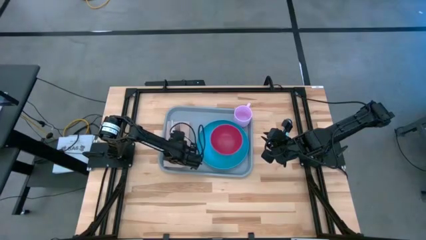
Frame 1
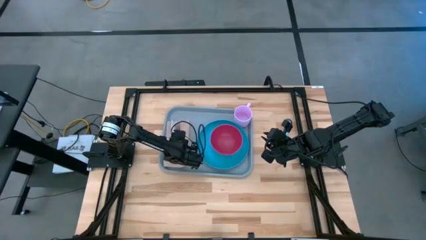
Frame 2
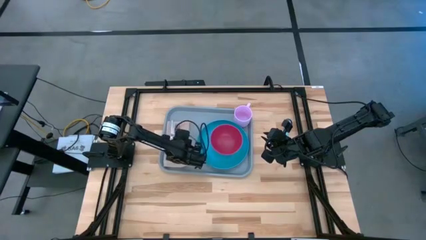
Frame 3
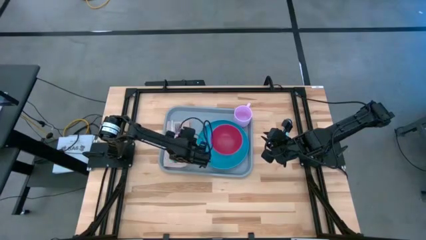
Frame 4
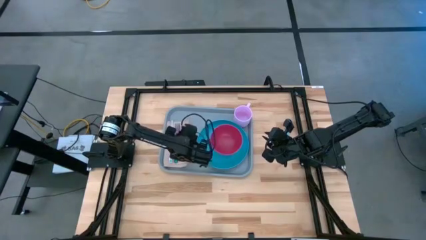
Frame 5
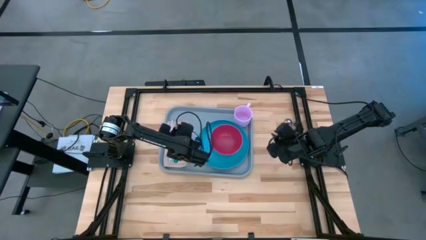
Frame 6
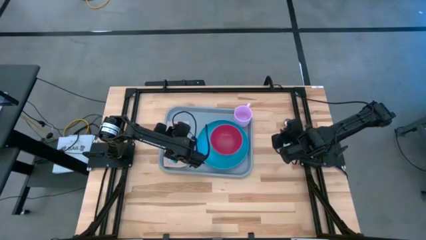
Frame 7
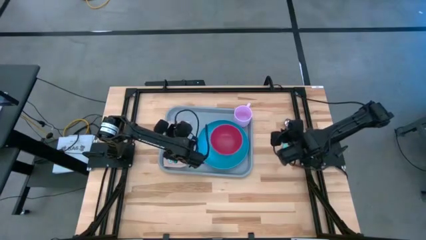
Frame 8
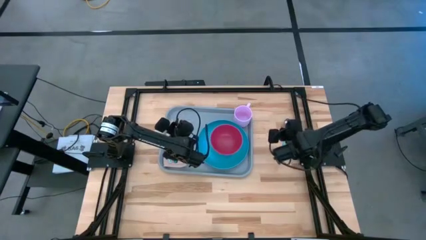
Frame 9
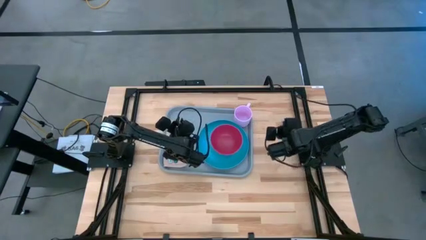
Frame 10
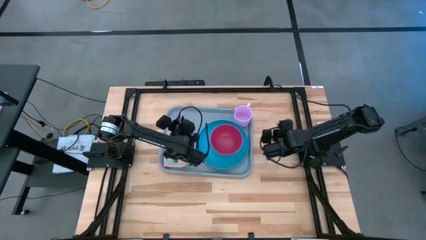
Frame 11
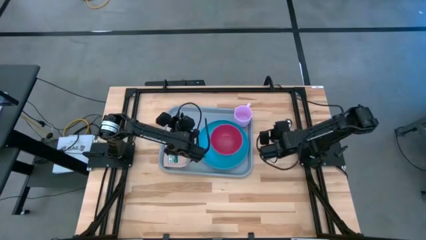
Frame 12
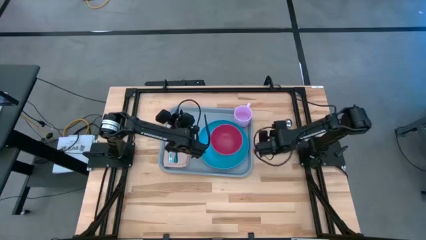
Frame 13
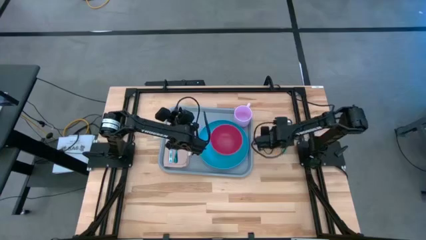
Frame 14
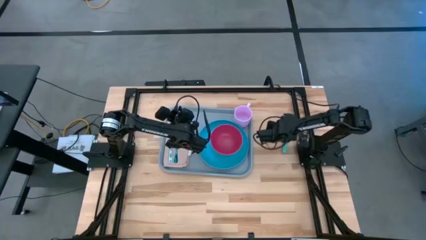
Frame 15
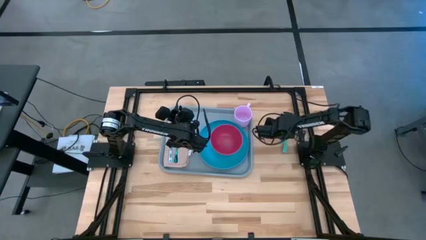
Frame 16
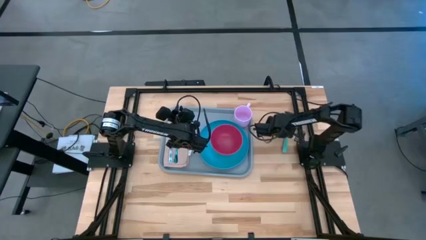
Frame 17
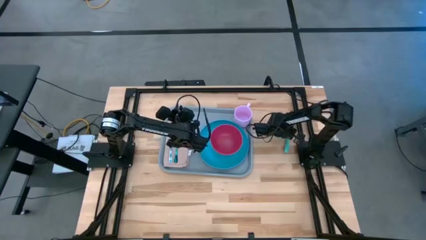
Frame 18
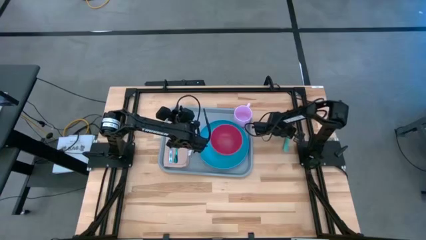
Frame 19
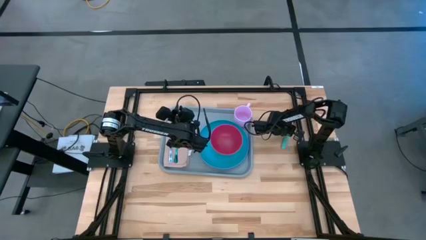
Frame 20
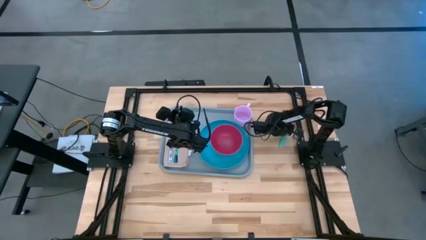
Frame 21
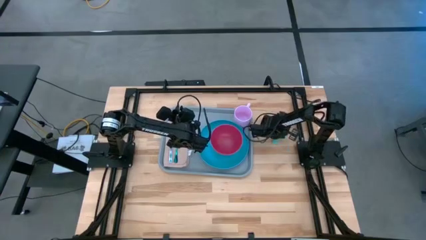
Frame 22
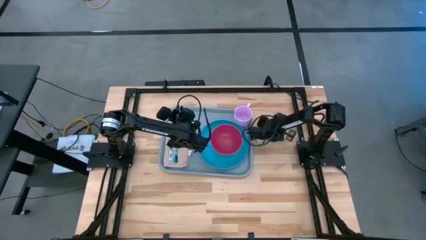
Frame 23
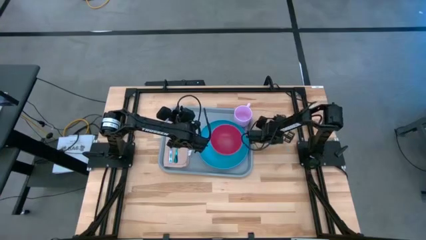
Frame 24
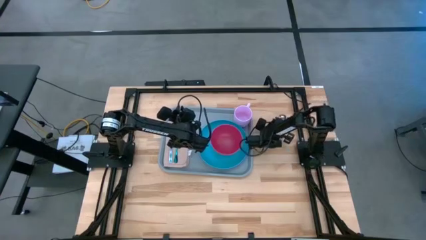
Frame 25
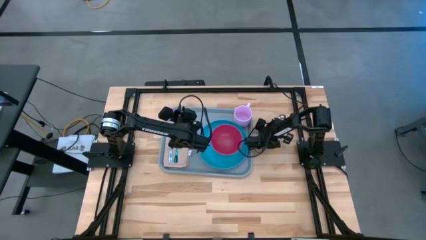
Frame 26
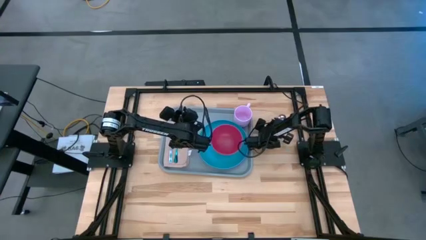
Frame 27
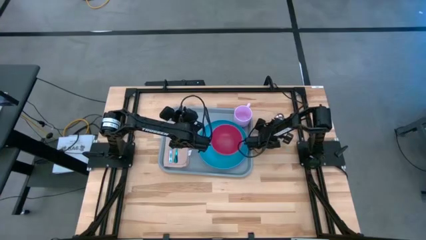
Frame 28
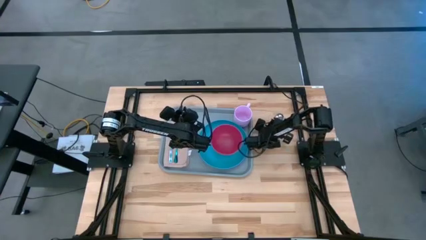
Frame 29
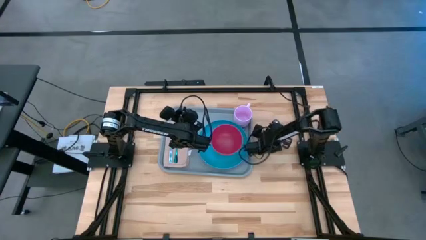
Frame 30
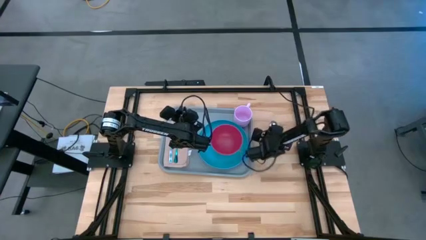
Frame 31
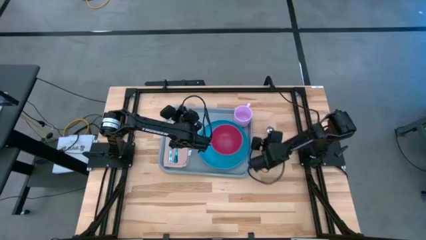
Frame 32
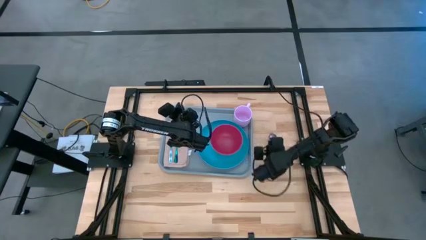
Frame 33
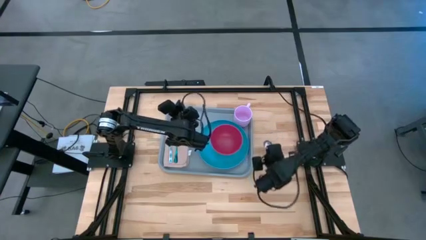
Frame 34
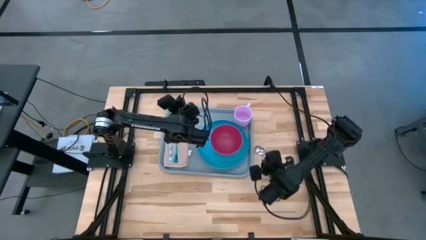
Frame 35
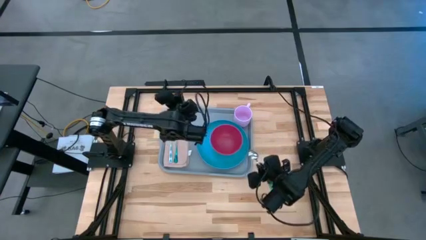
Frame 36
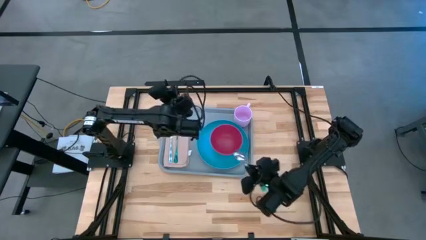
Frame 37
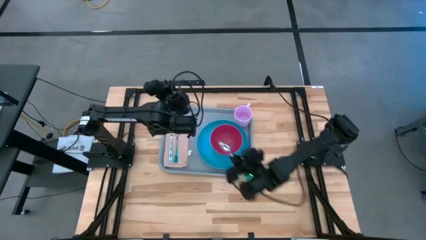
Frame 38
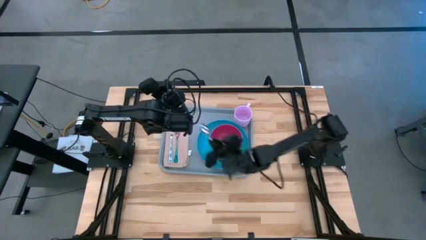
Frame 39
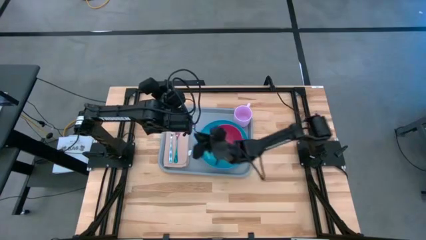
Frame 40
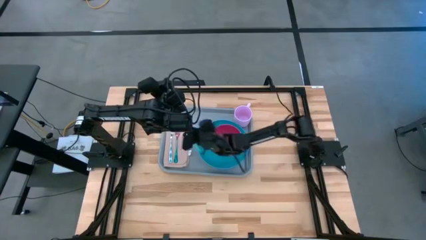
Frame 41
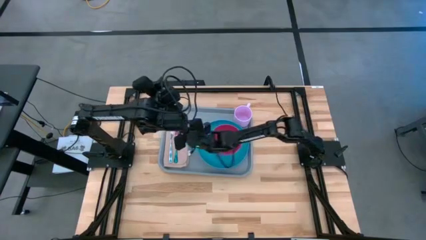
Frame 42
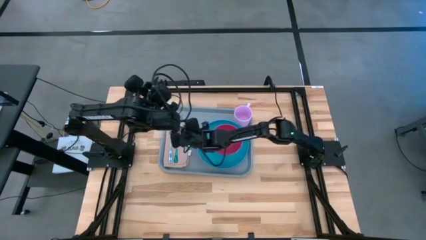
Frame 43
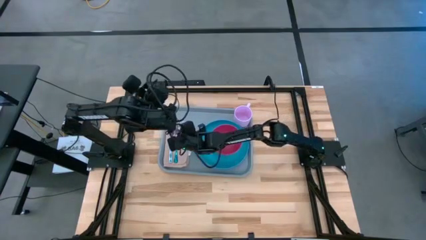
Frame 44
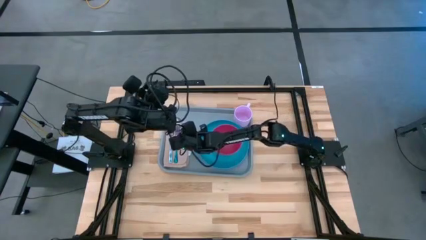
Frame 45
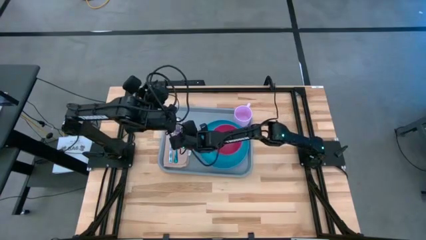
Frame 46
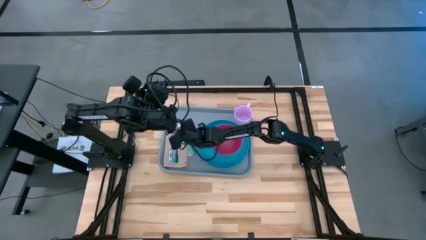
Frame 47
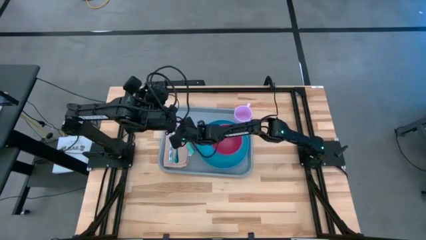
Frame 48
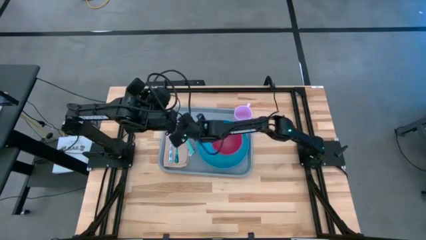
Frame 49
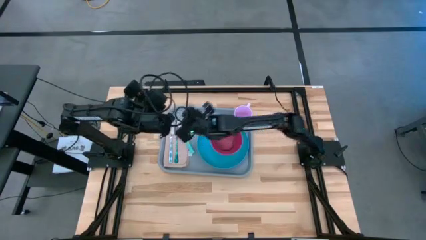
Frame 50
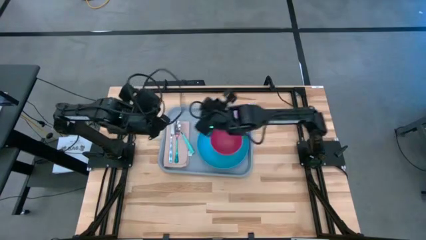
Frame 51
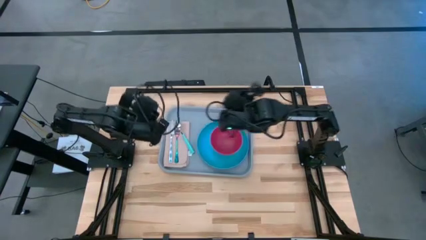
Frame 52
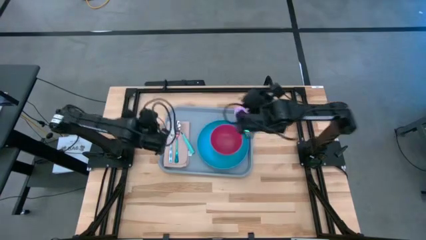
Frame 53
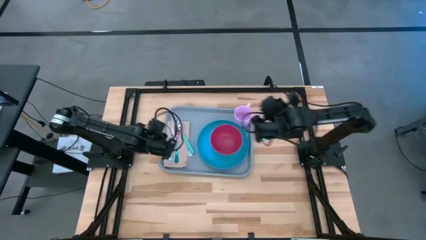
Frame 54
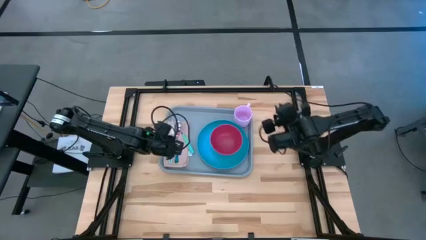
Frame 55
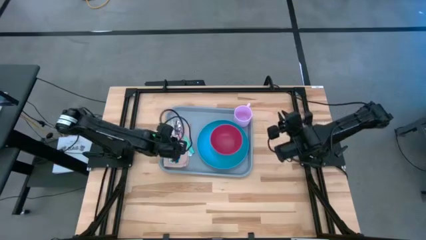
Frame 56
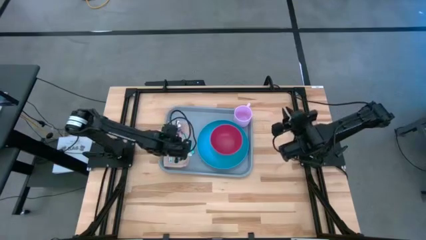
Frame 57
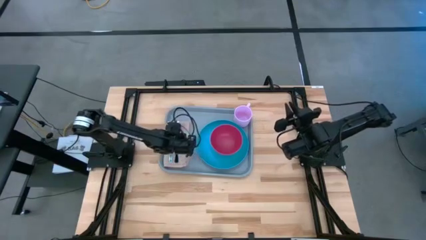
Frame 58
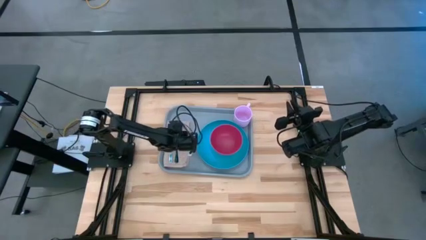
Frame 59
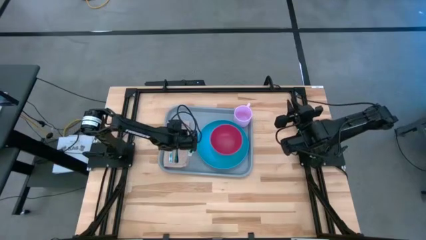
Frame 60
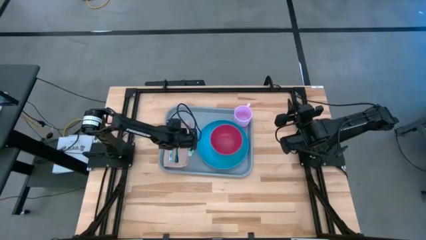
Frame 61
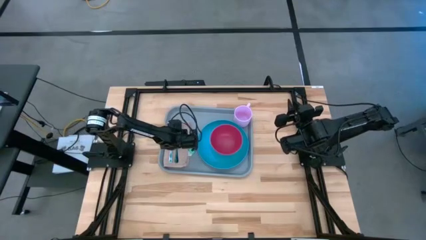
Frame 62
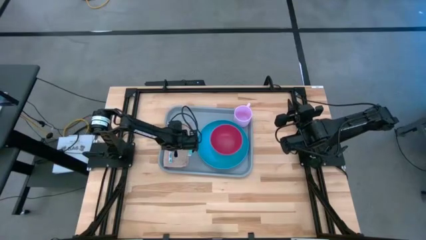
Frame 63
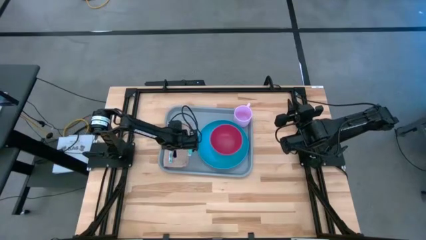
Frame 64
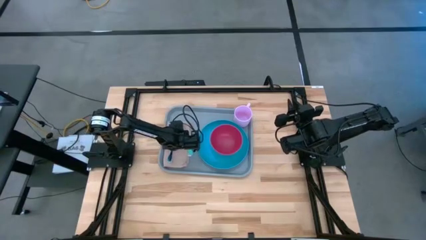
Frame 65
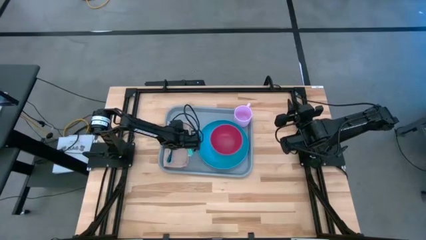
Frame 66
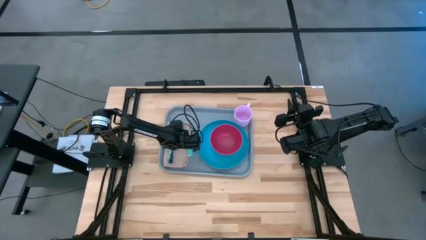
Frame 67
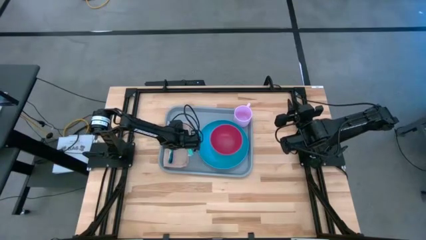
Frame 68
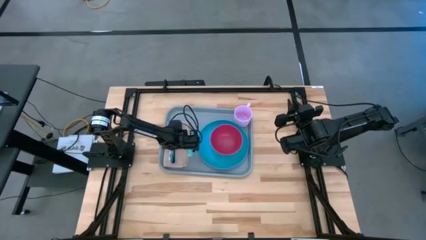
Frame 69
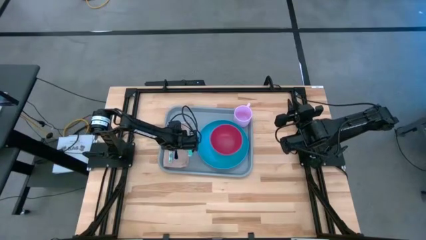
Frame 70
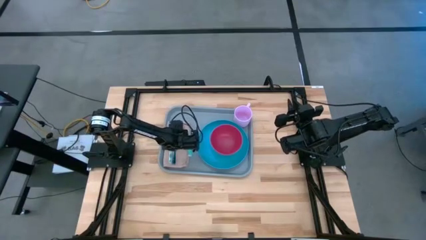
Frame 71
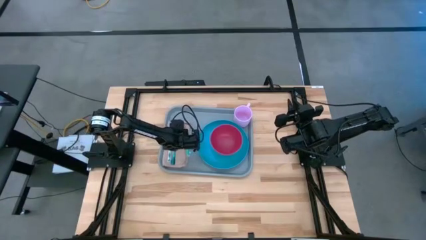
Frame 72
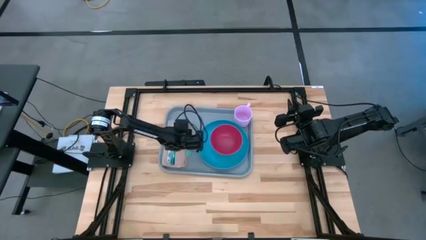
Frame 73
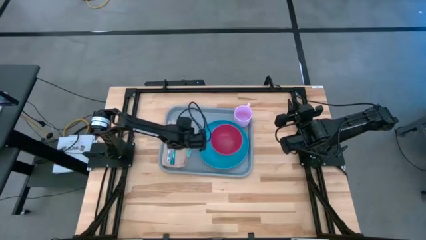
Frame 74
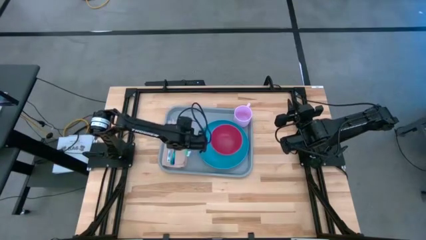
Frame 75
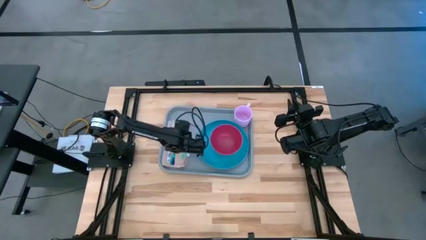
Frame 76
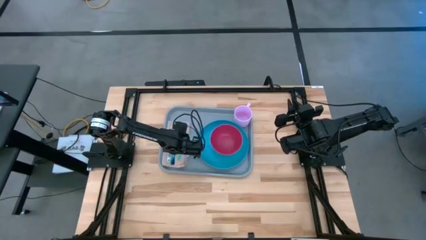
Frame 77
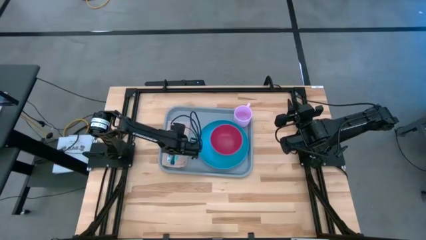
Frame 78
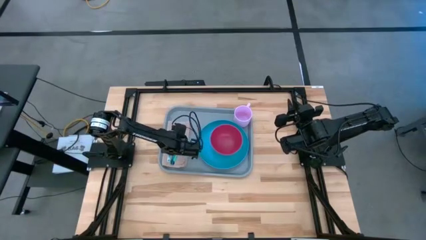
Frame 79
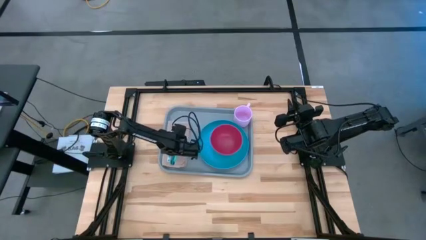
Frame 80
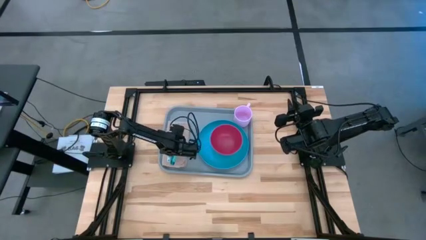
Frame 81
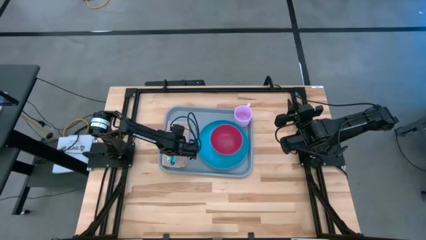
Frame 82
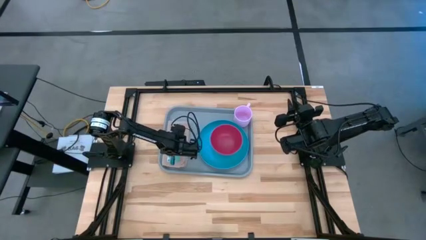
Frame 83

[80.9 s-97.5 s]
Task: Set up tray
Put the blue spoon on the brown napkin to the right of the fork

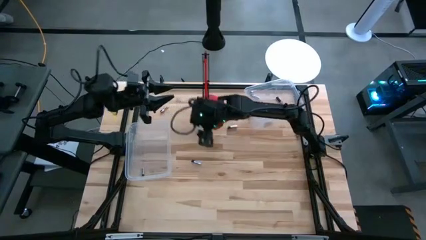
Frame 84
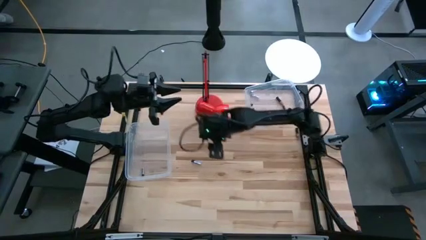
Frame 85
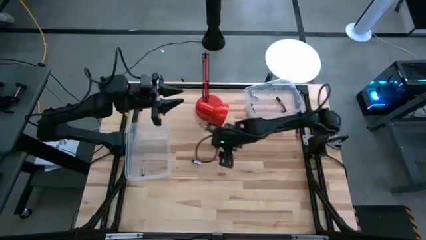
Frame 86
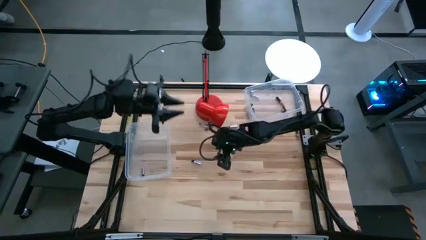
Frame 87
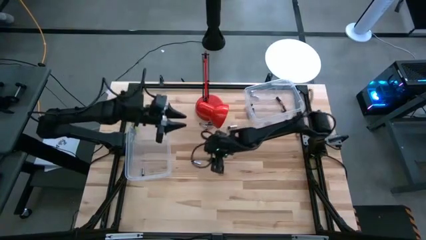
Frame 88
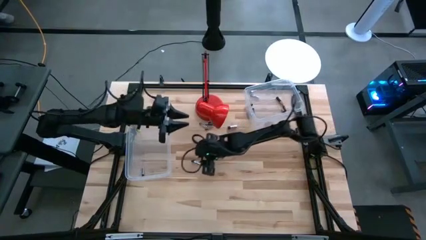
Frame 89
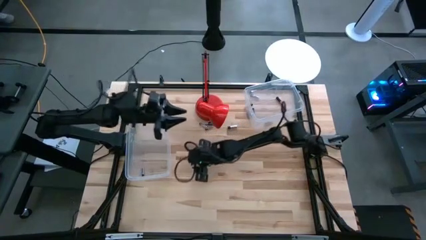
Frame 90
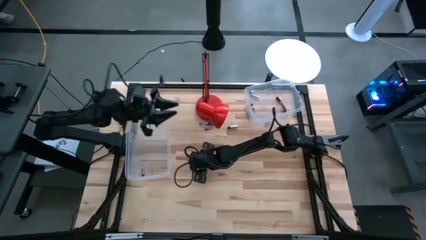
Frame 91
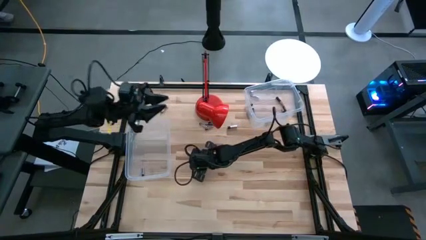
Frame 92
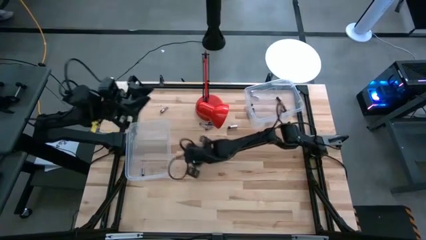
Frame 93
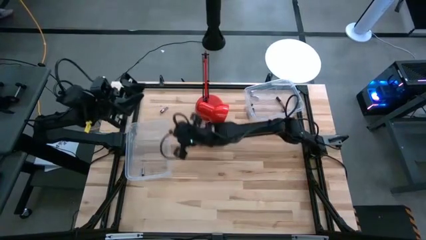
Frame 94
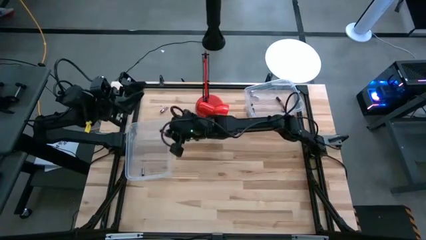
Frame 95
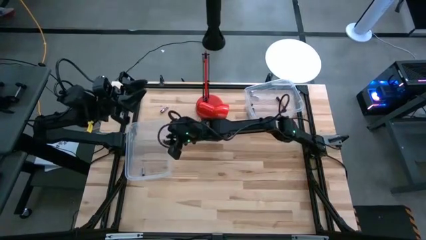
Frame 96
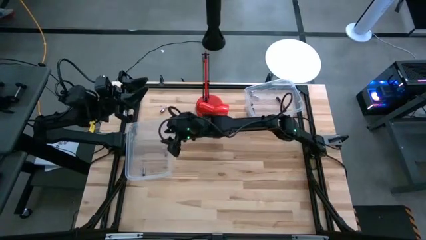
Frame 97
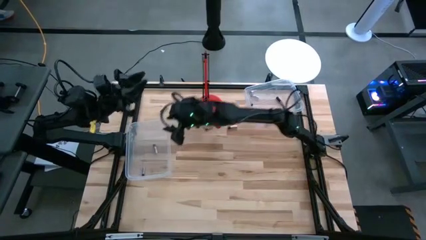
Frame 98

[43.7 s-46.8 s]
Task: Sort batteries
Put the silver battery into the bottom transparent bin
